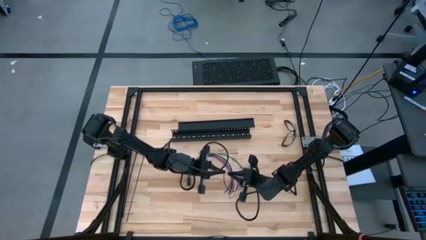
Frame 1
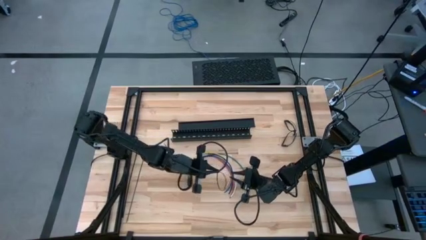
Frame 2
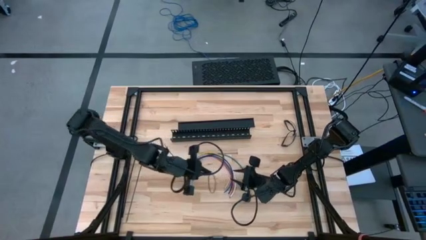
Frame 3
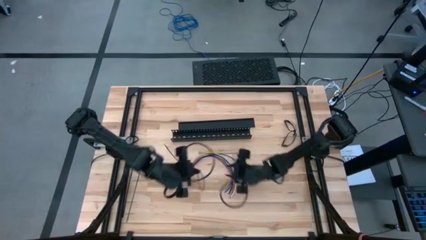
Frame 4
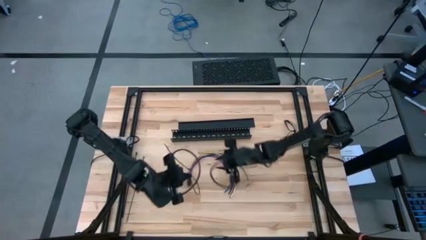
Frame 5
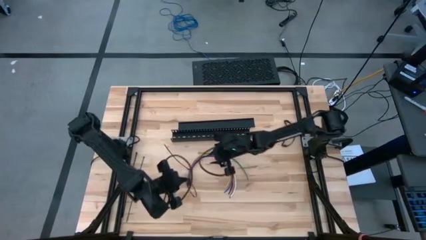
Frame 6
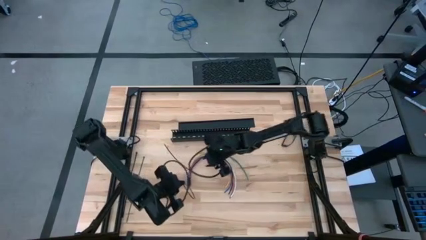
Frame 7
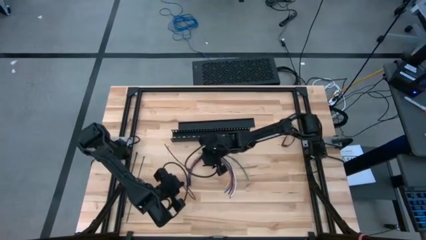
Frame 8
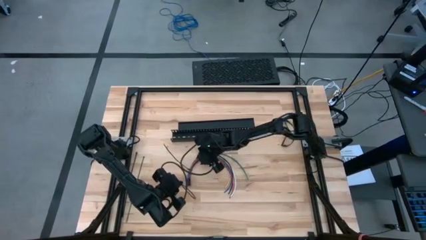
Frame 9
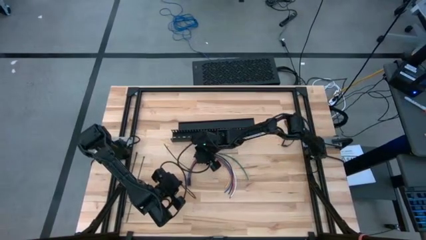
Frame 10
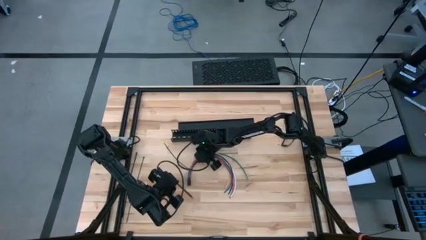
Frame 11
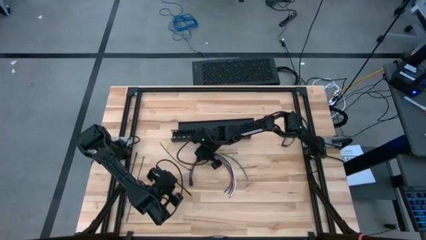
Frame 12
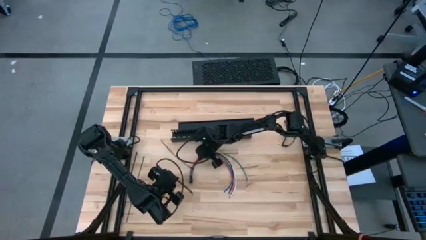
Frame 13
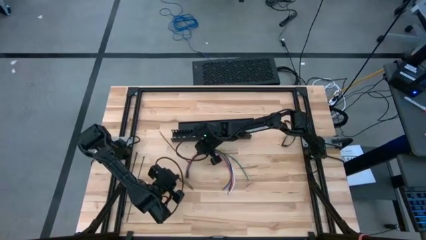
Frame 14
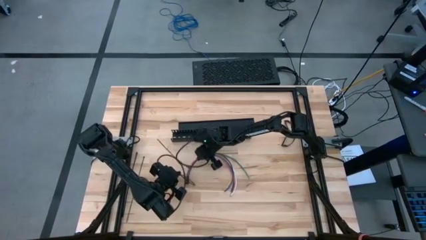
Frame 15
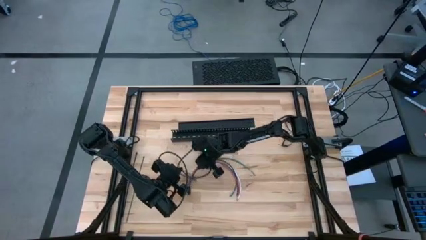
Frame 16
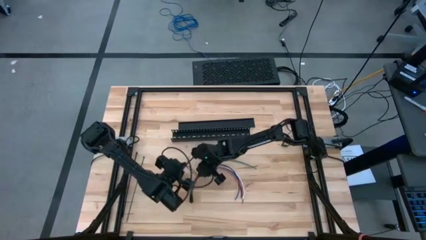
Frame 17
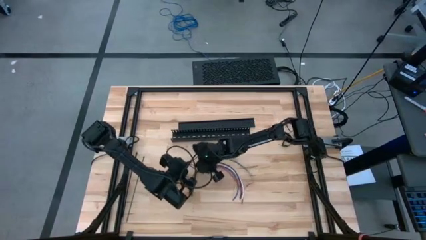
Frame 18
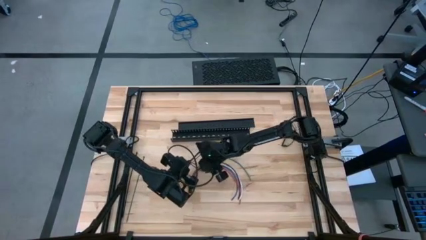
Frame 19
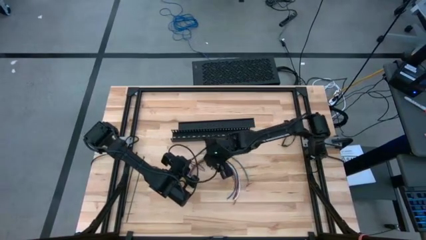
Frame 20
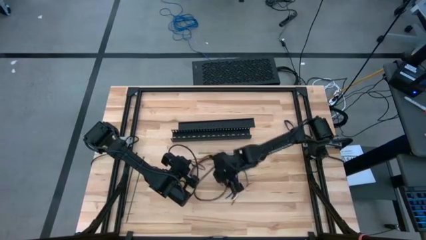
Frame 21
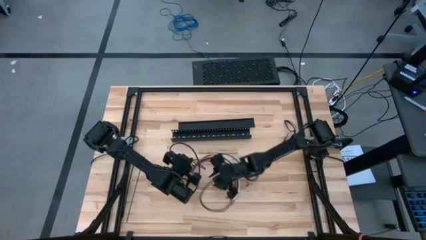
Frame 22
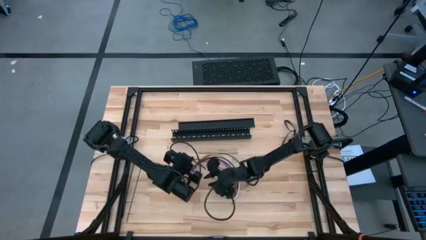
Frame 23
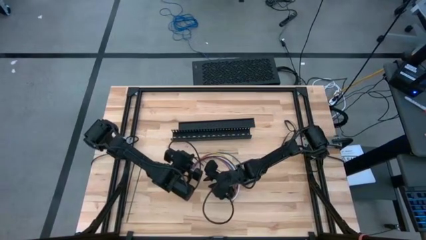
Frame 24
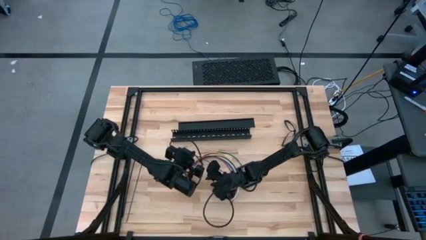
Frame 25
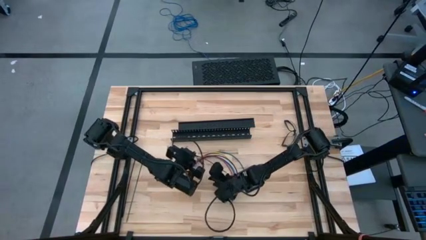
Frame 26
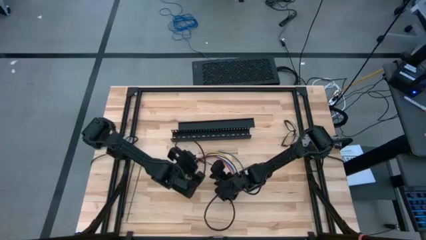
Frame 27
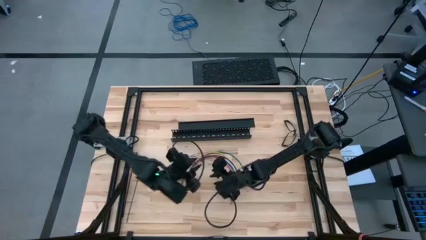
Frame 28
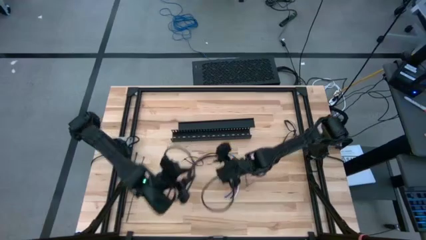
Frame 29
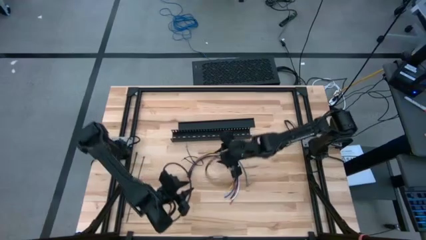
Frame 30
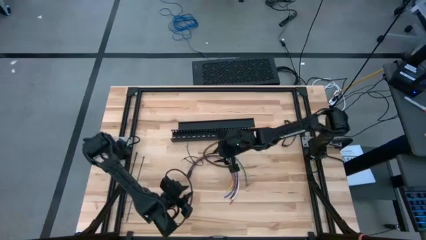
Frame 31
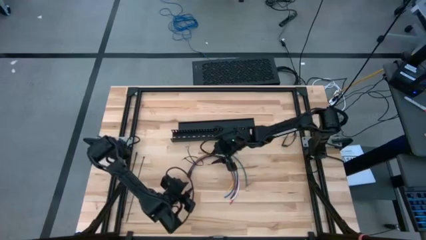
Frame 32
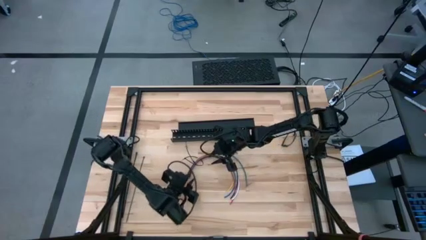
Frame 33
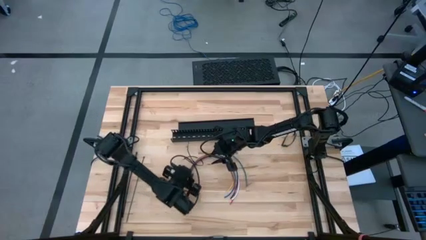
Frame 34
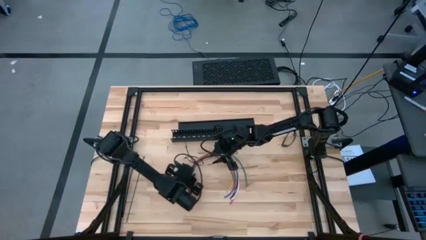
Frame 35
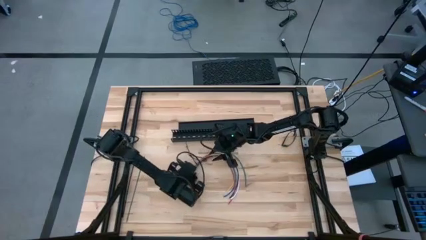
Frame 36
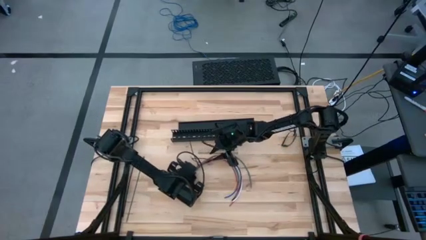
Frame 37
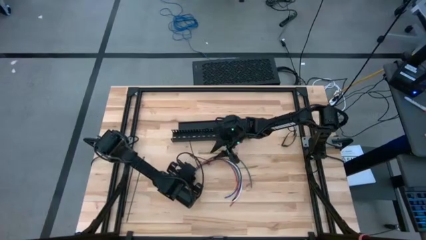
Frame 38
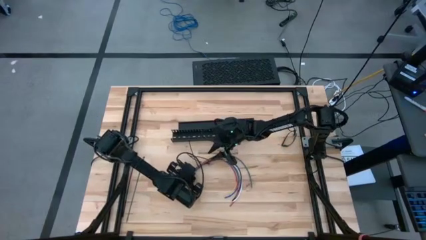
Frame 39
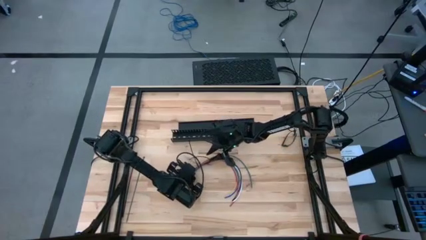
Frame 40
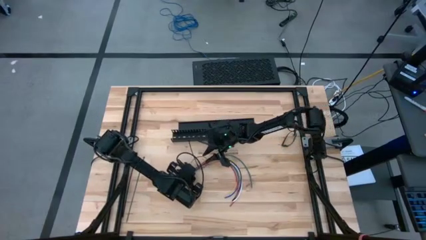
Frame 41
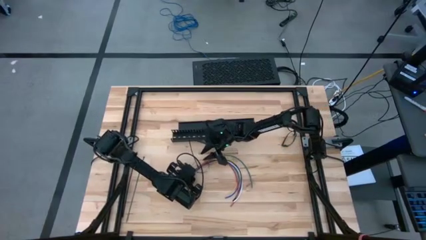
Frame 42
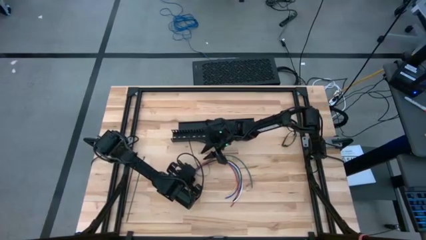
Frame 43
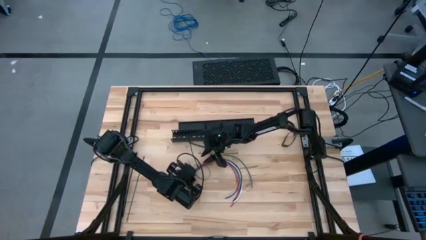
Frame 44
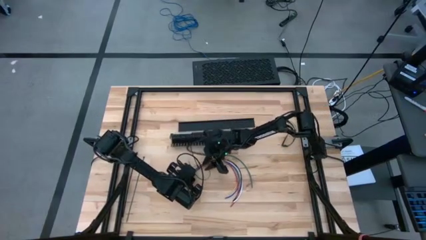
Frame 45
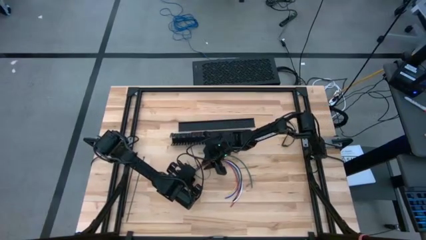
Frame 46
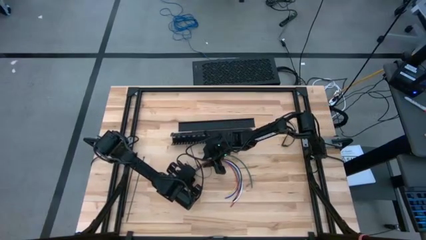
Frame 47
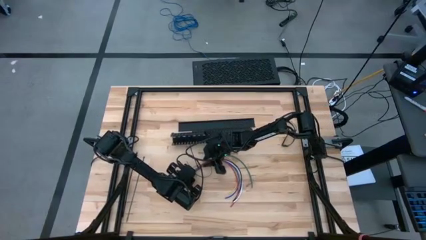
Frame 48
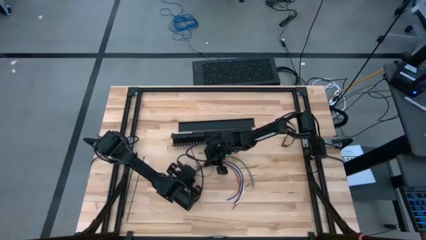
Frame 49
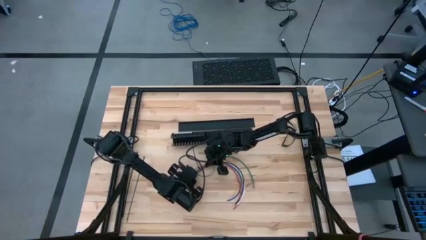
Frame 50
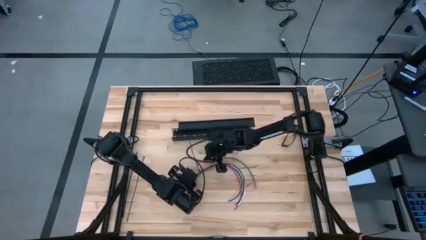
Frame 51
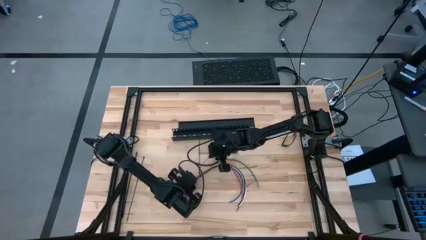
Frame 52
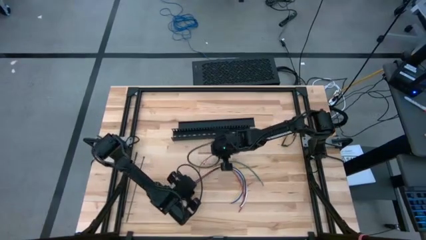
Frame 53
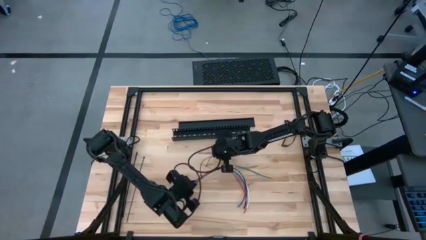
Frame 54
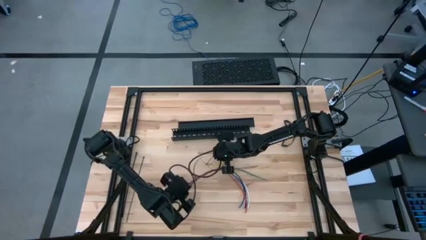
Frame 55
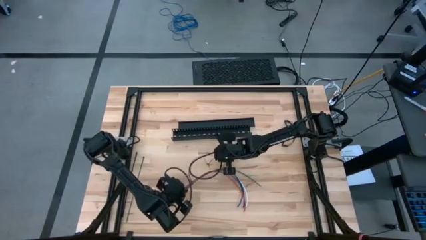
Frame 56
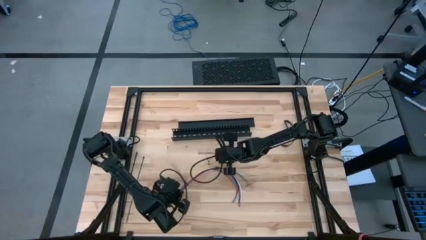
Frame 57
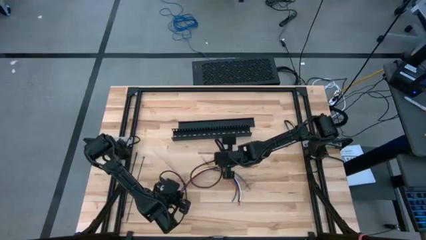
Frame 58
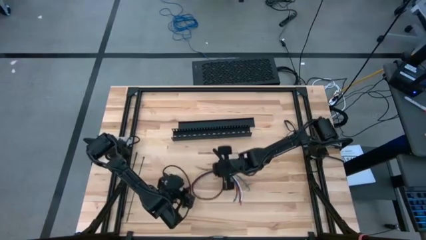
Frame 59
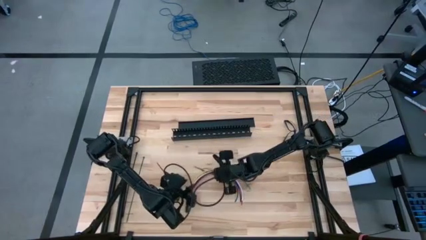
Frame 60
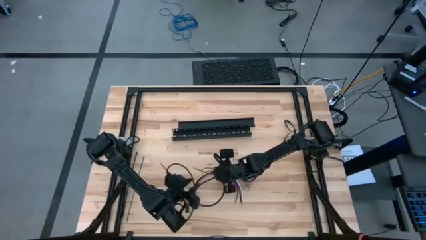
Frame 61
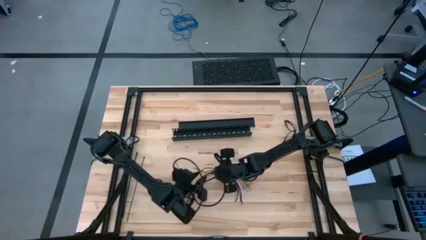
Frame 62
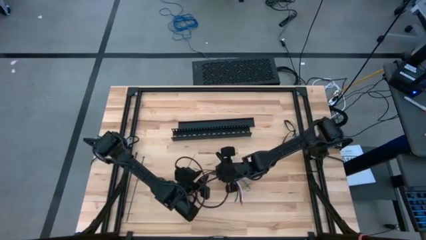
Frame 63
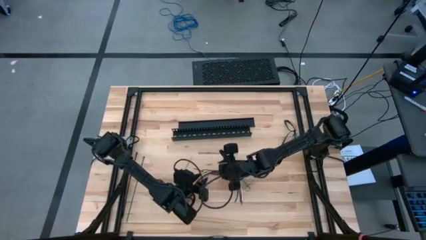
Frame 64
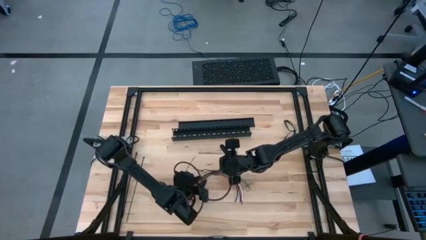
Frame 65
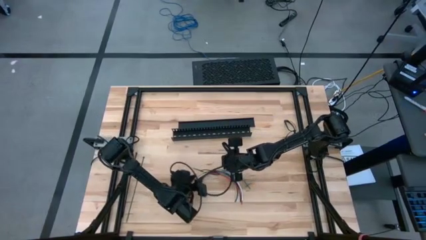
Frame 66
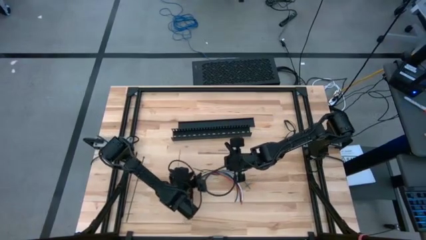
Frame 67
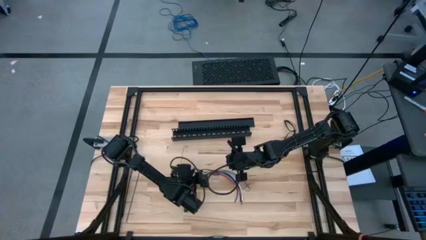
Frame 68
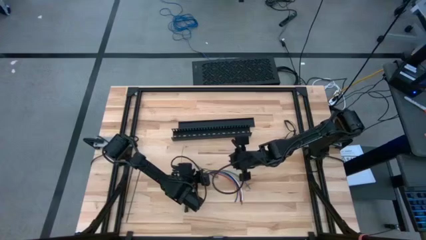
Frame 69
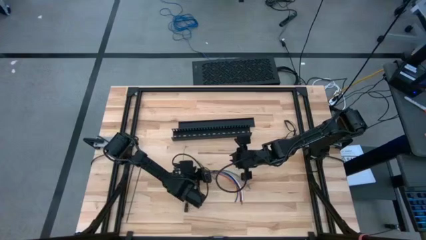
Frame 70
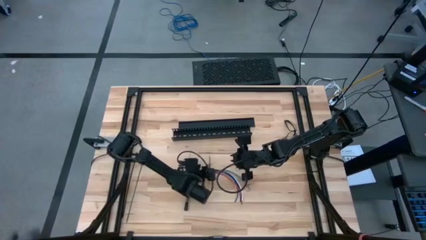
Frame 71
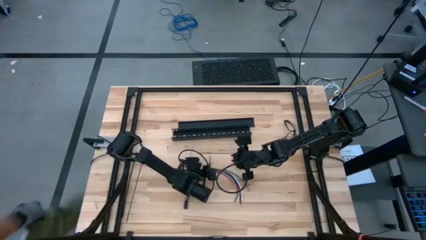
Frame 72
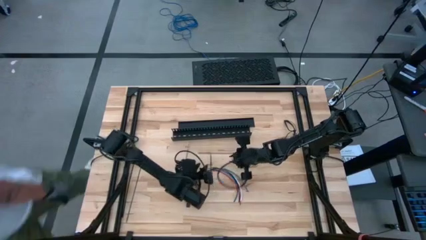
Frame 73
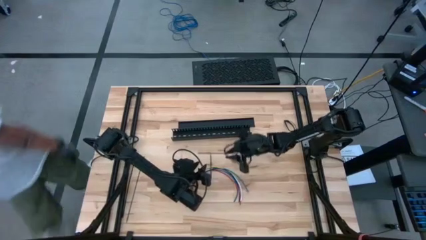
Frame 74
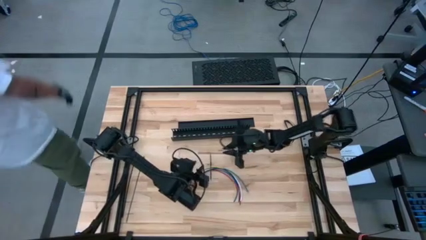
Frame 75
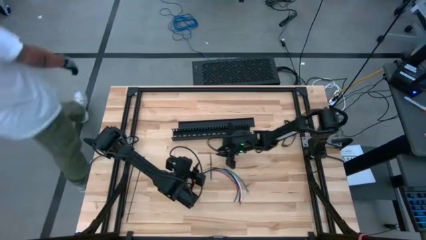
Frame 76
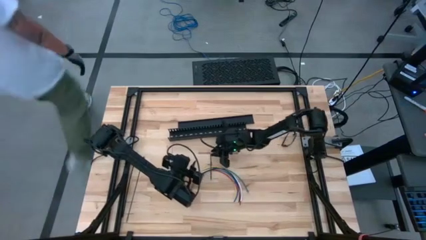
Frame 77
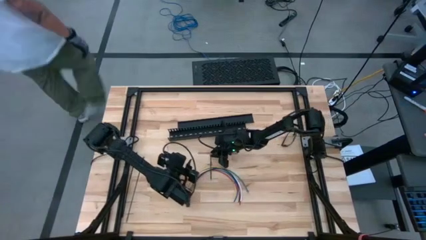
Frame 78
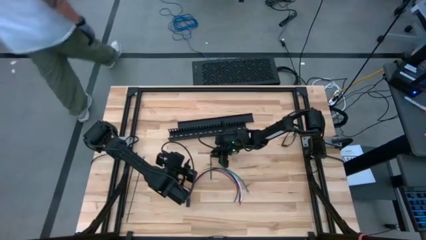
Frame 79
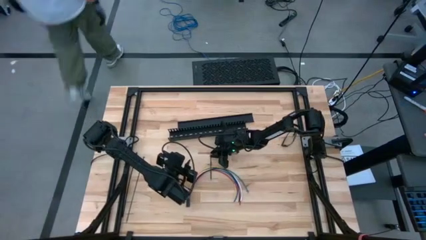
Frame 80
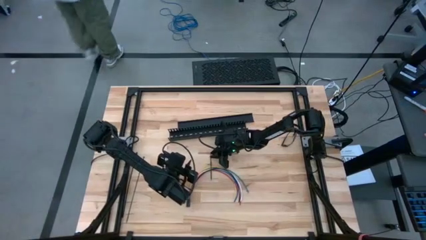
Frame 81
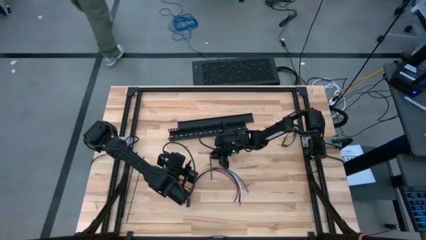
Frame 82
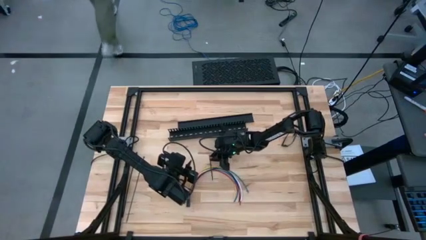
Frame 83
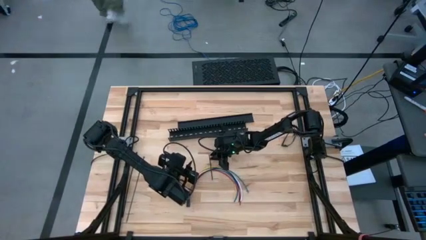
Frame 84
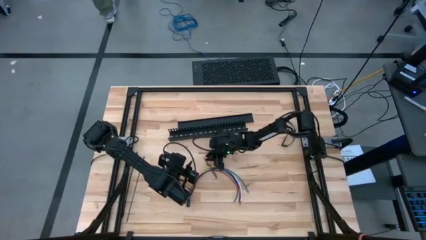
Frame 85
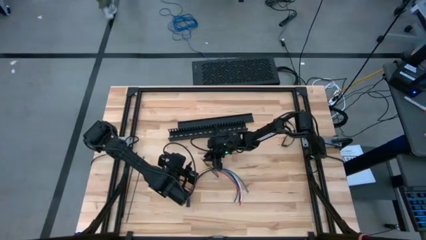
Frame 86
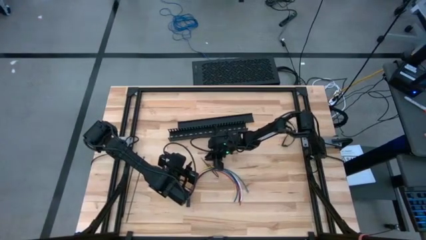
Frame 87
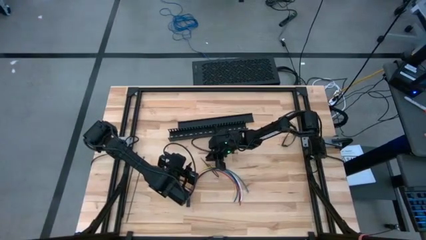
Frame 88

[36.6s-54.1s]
Task: Ziptie cables
Wrap the cable wire using a zip tie
